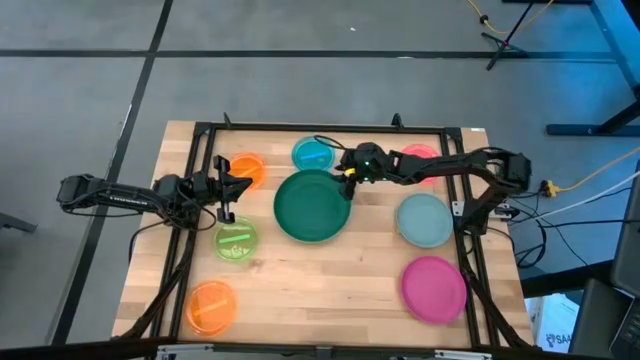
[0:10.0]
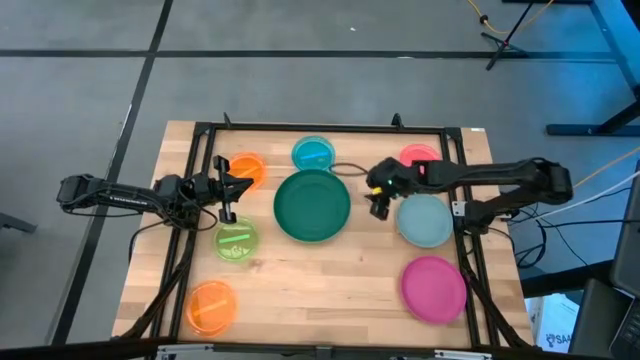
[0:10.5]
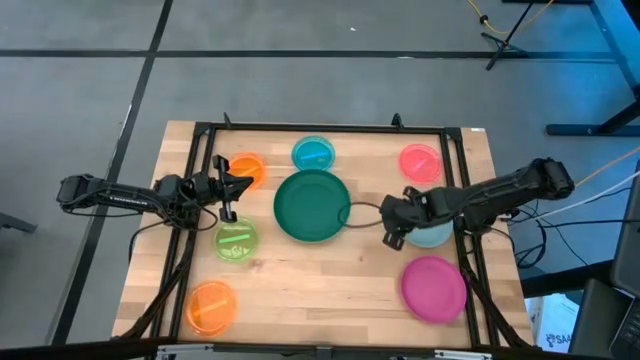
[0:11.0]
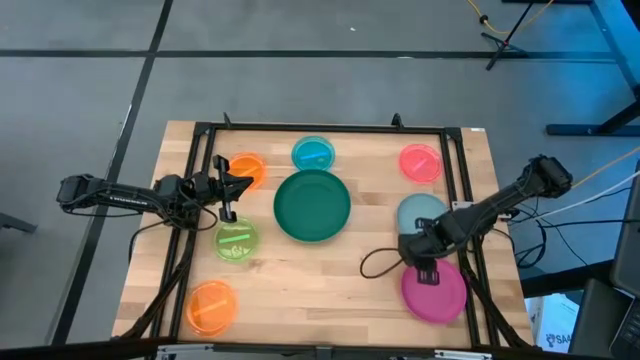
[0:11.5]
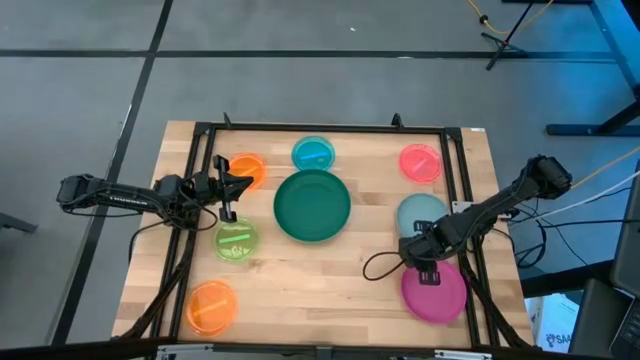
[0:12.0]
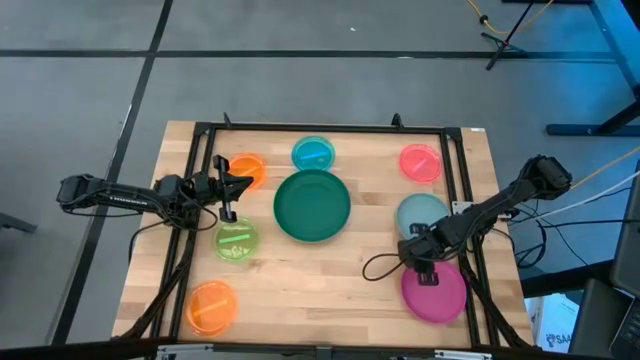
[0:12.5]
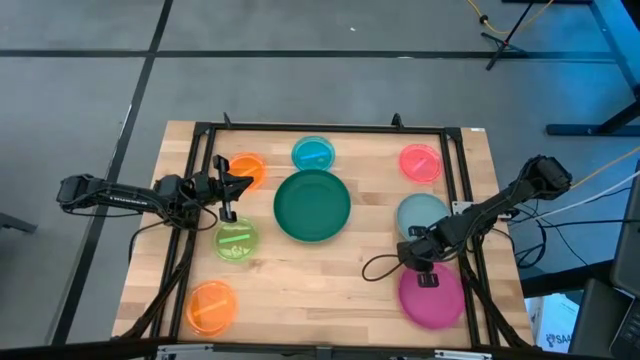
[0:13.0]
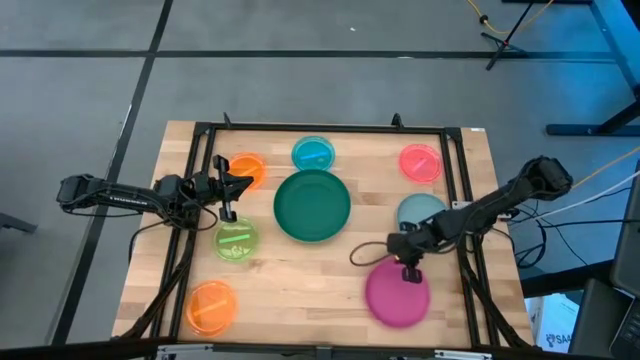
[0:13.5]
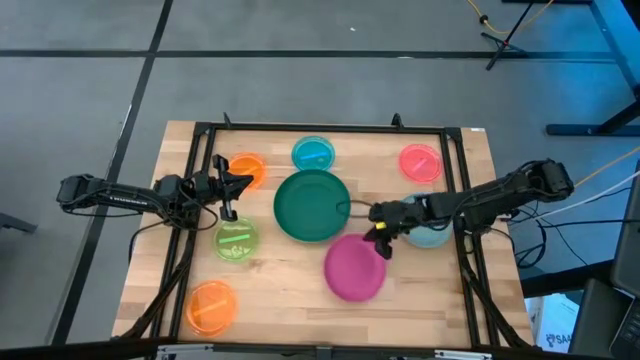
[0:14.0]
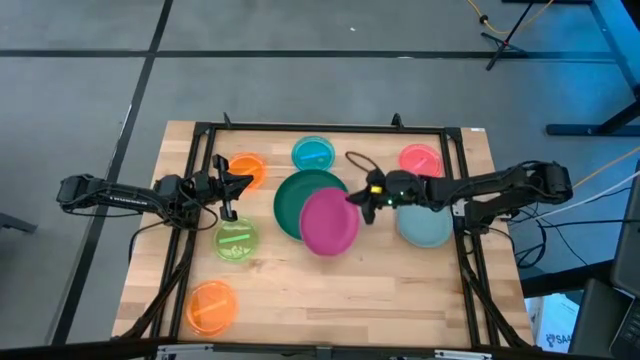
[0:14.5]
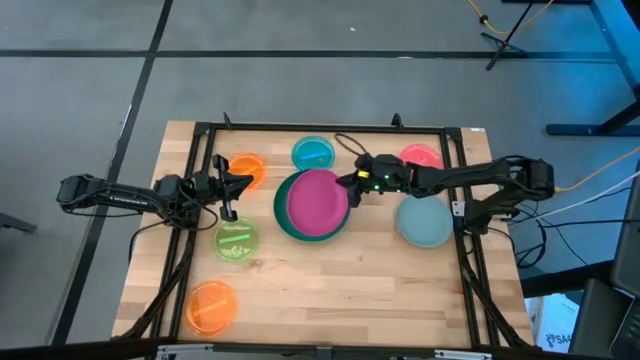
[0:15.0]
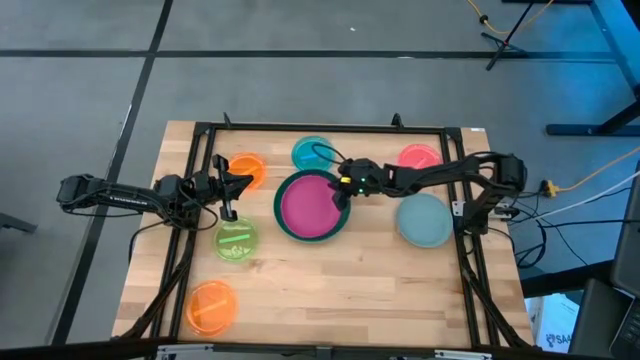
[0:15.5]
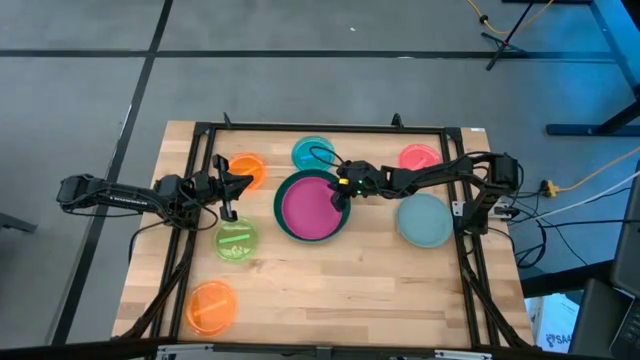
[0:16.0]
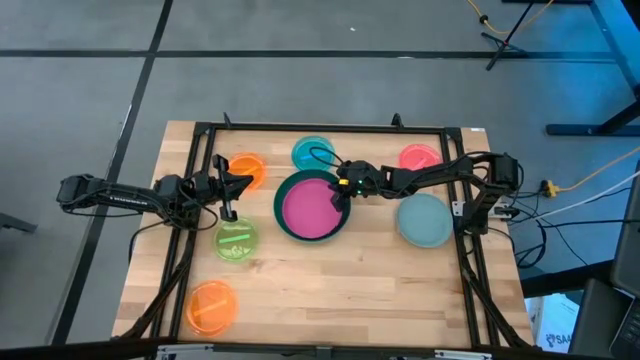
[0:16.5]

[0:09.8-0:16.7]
Task: Stack plastic plates
Stack the pink plate on top of the dark green plate

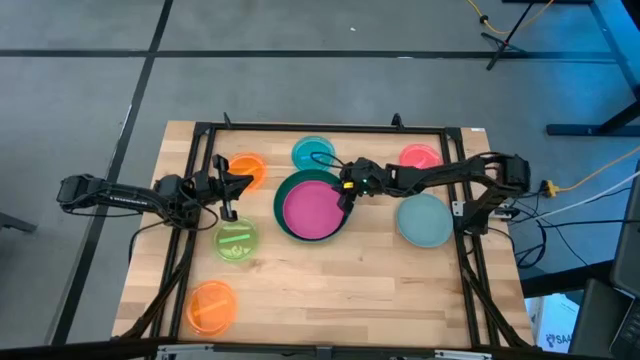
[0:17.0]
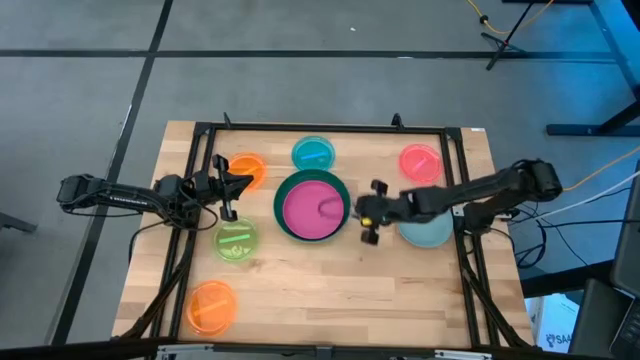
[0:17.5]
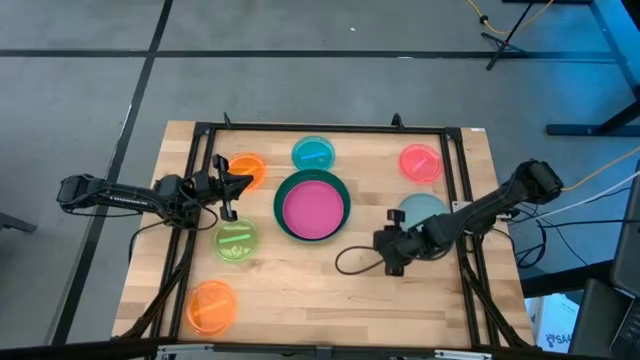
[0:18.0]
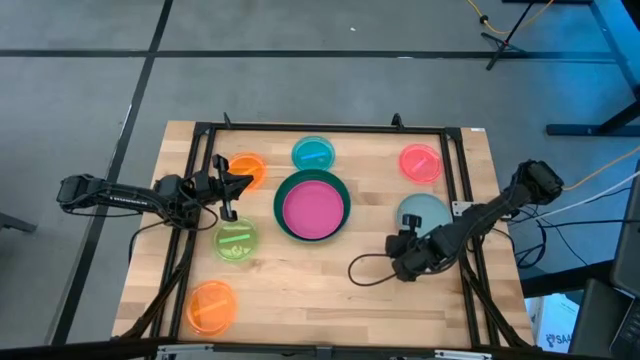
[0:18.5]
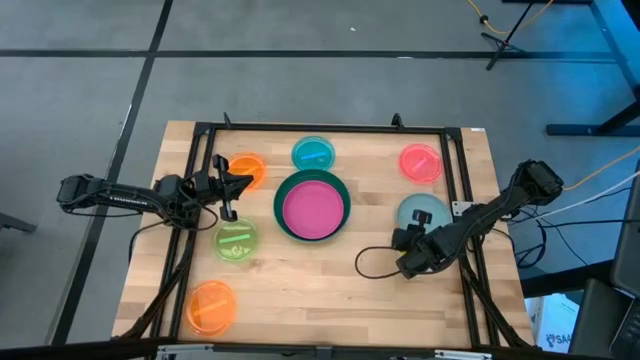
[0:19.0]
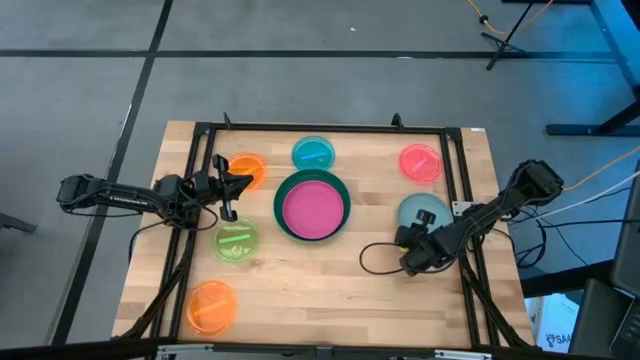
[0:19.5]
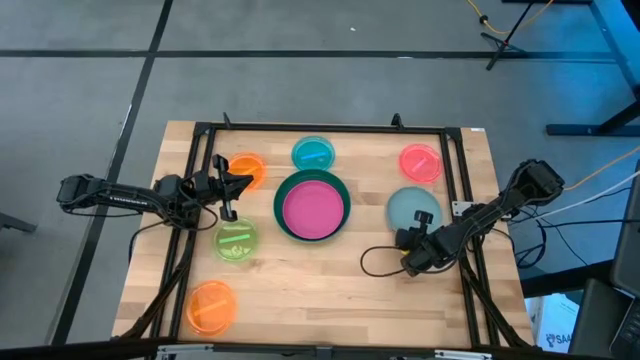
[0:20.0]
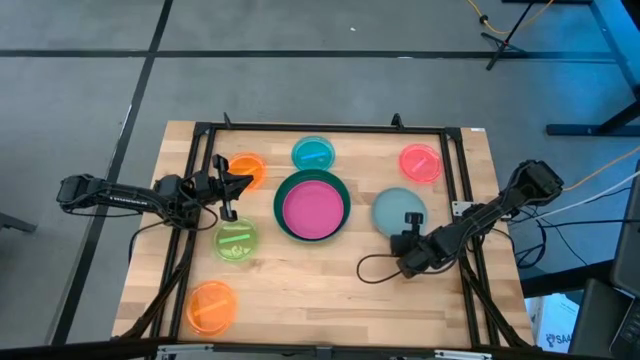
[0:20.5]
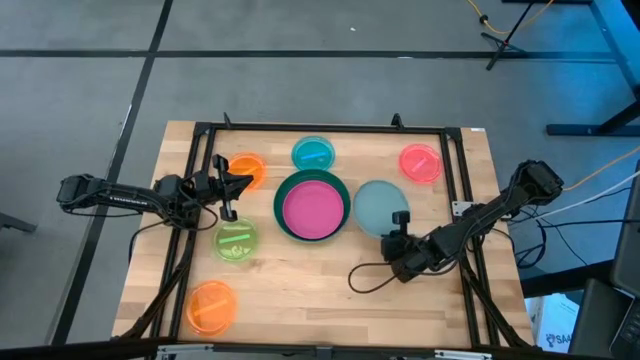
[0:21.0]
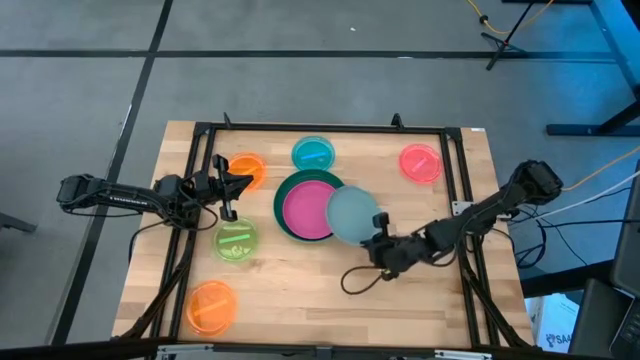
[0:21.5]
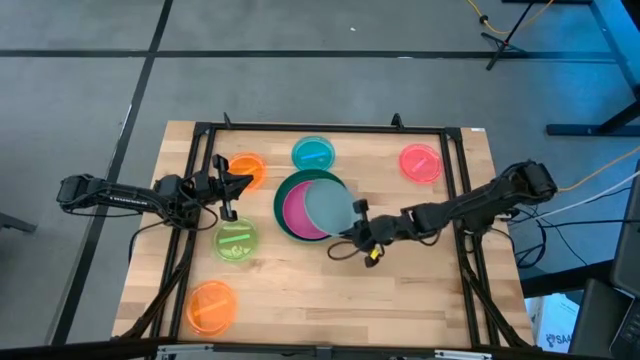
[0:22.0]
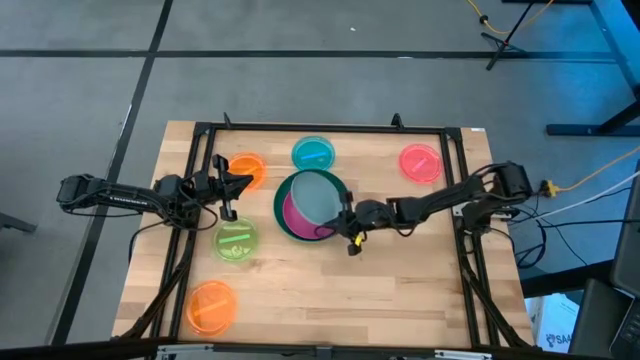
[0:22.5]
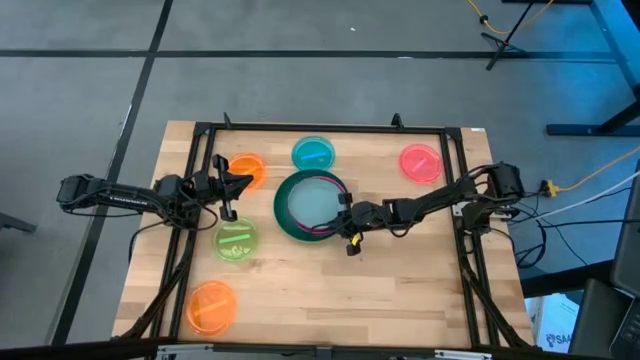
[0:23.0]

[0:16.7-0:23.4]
Stack the blue plate on top of the pink plate

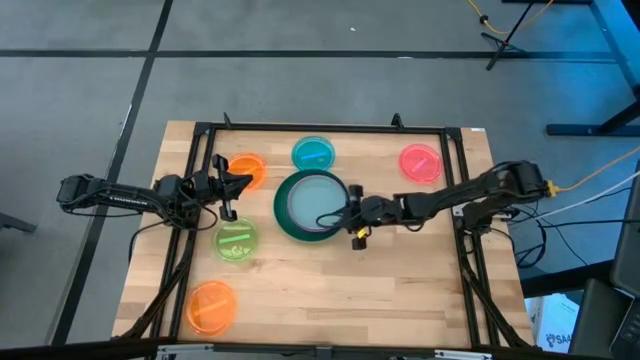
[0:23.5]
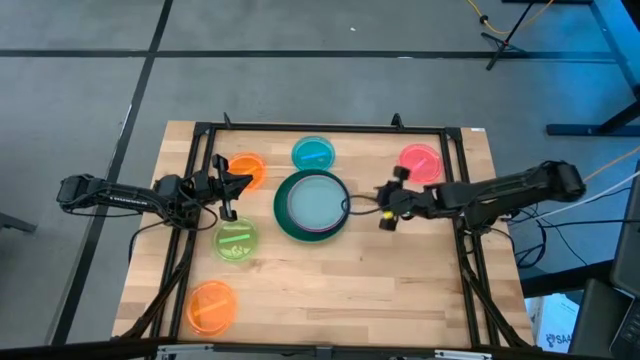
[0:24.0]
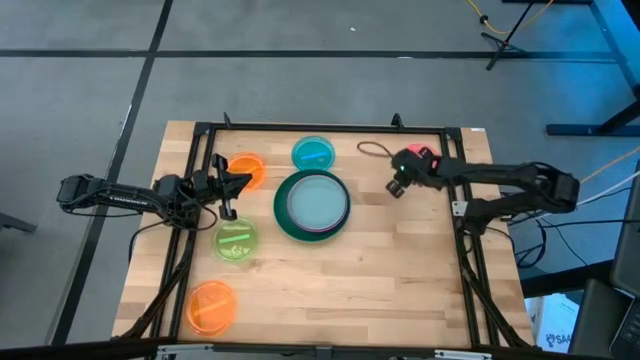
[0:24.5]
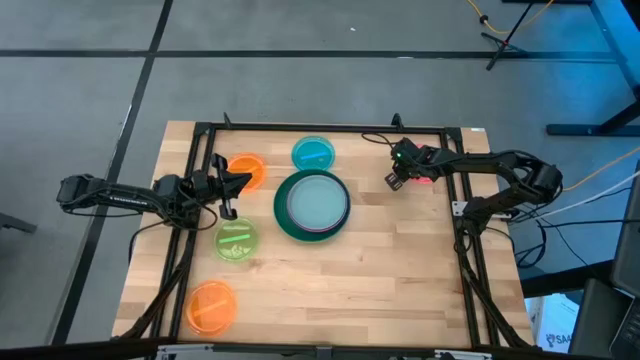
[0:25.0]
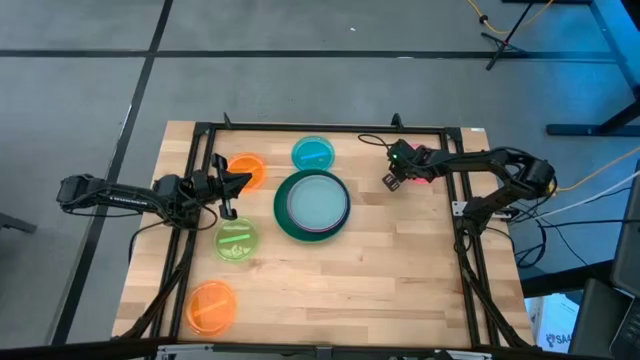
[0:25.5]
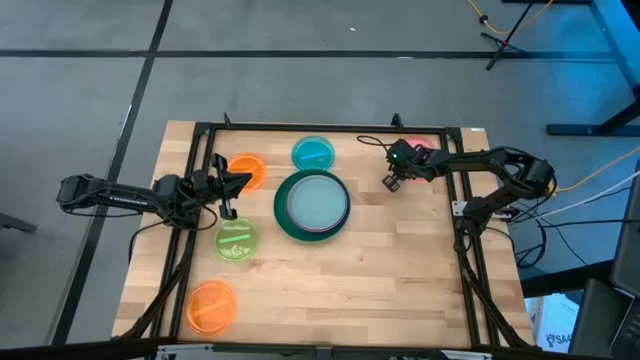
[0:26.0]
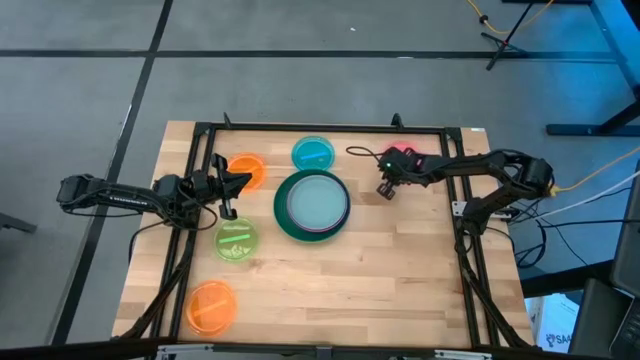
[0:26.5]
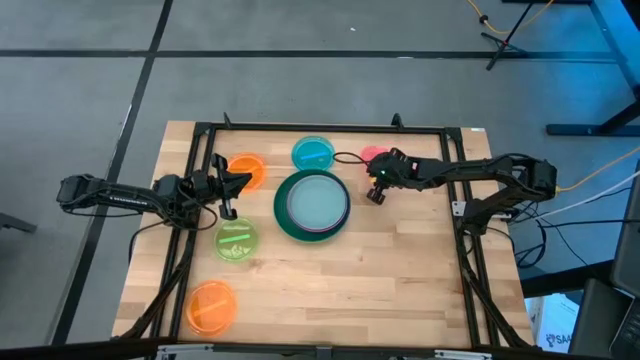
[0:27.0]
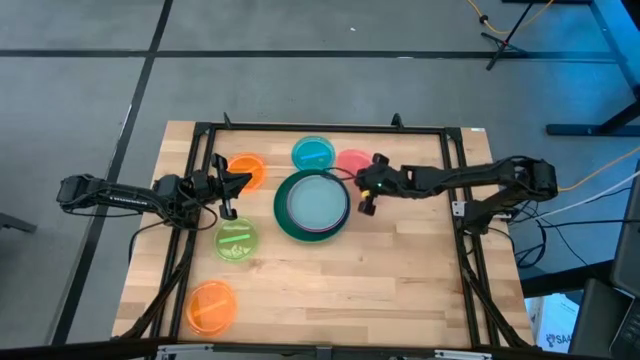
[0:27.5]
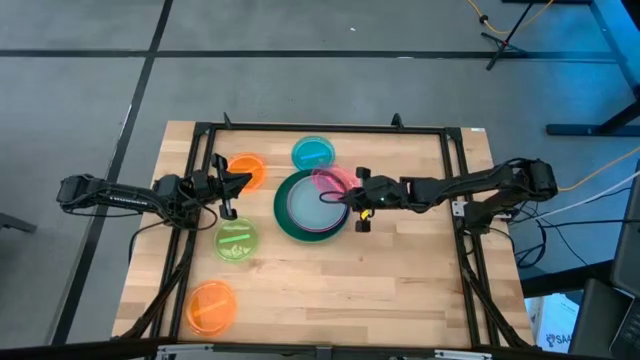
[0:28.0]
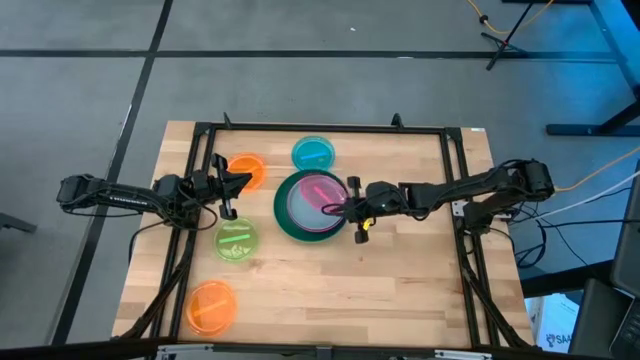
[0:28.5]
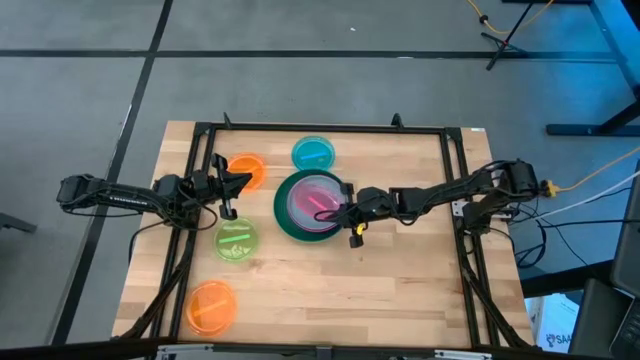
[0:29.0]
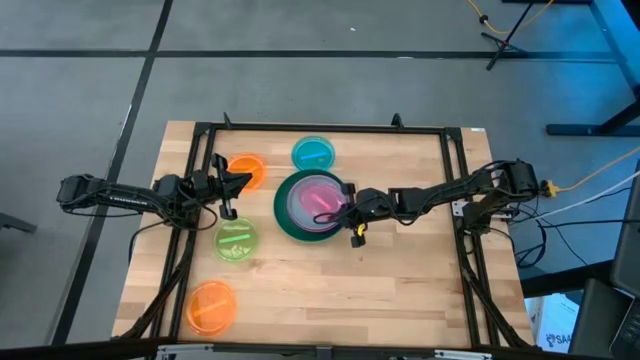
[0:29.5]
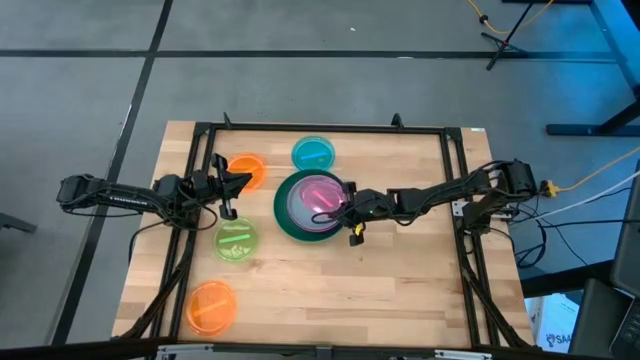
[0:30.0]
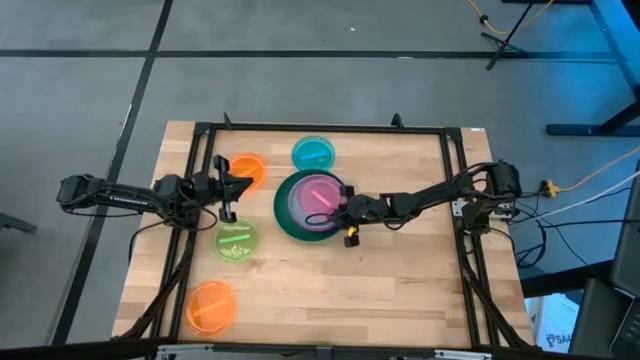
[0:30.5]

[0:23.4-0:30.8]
Stack the light pink plate on top of the blue plate
